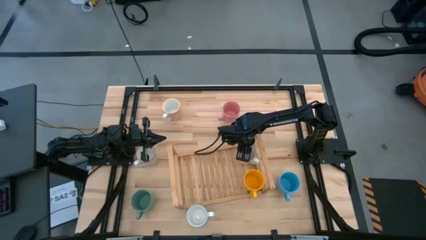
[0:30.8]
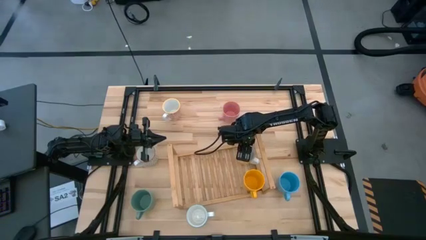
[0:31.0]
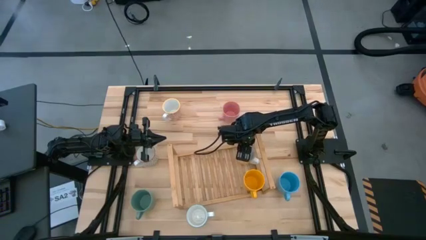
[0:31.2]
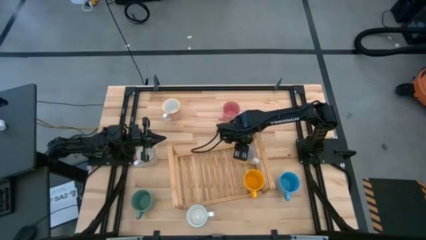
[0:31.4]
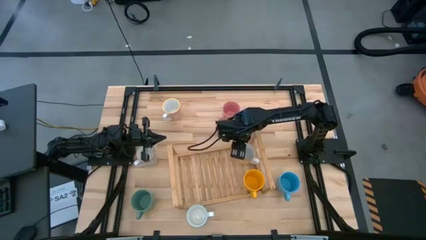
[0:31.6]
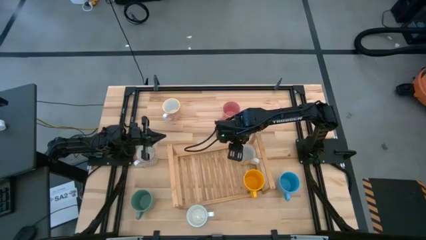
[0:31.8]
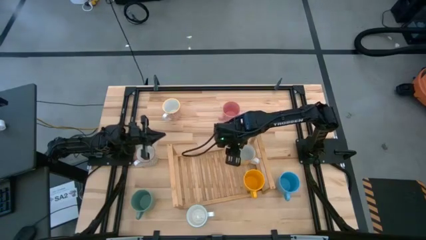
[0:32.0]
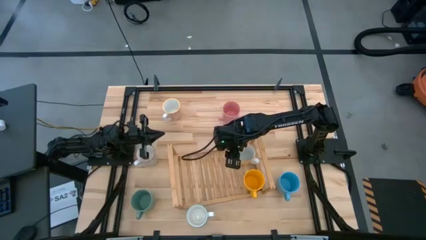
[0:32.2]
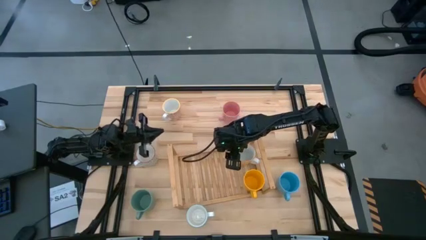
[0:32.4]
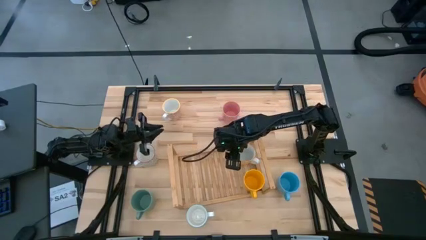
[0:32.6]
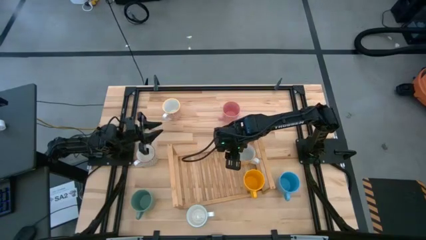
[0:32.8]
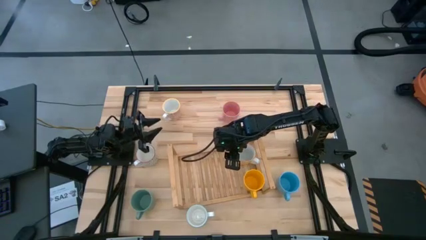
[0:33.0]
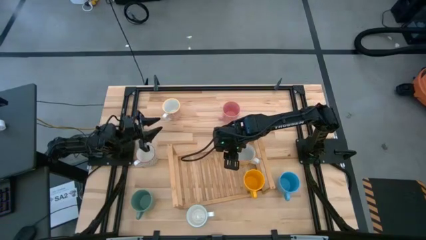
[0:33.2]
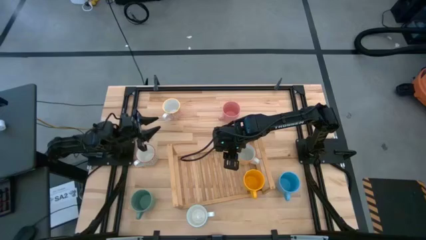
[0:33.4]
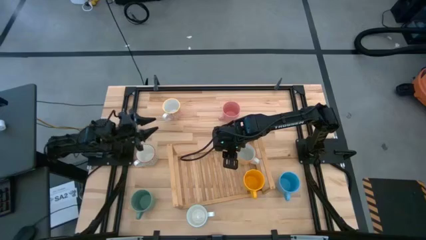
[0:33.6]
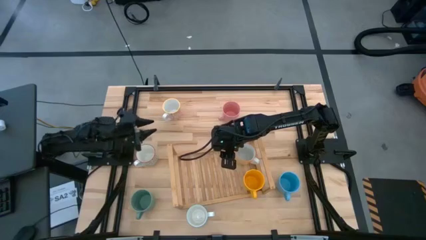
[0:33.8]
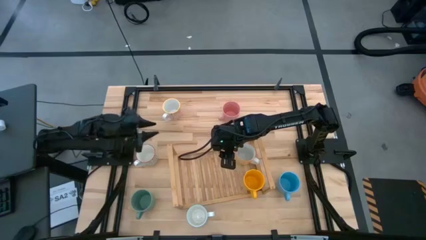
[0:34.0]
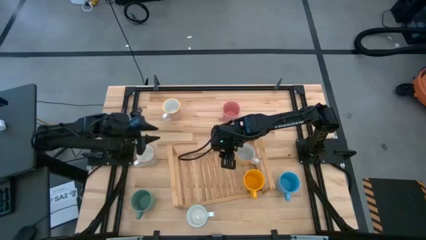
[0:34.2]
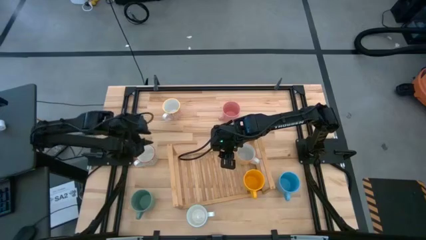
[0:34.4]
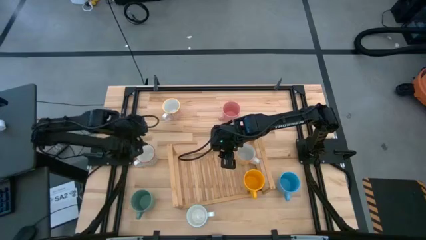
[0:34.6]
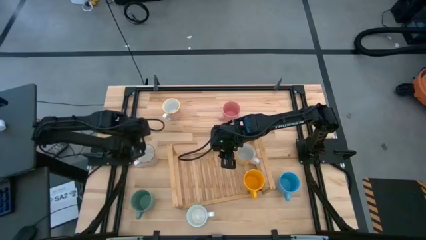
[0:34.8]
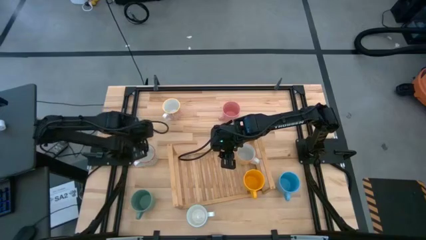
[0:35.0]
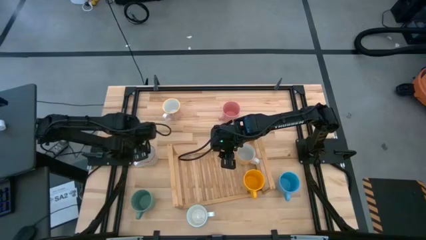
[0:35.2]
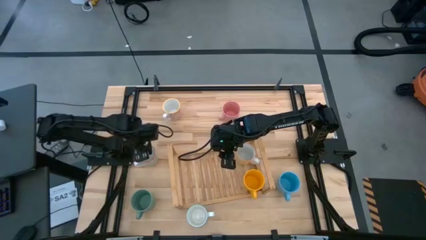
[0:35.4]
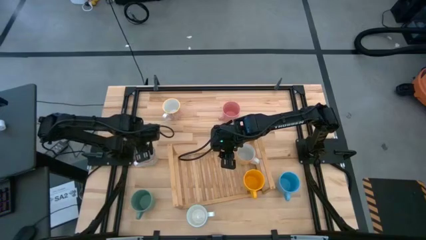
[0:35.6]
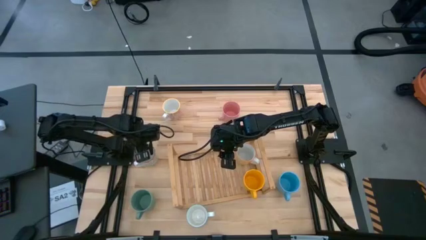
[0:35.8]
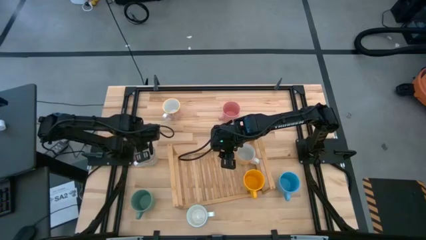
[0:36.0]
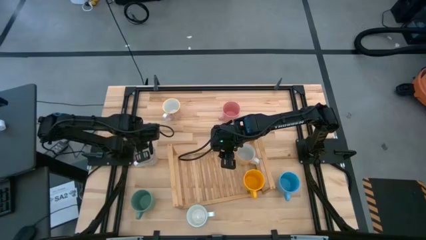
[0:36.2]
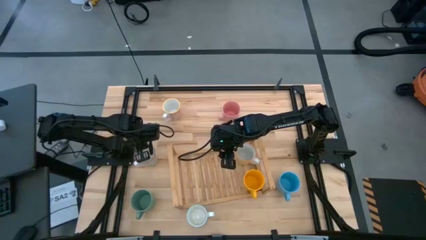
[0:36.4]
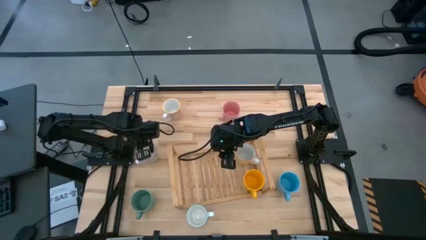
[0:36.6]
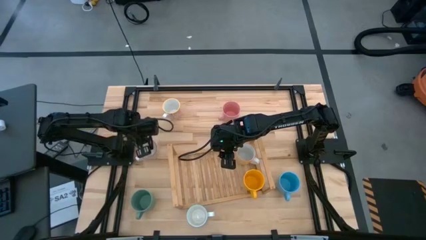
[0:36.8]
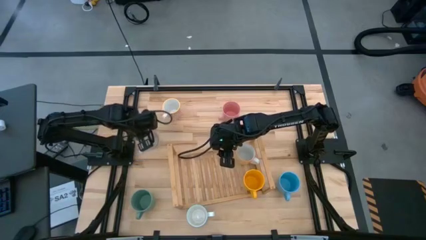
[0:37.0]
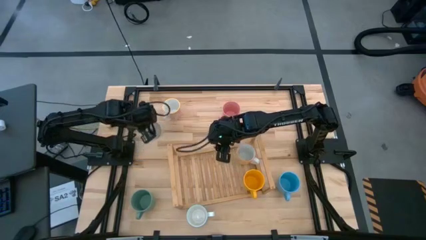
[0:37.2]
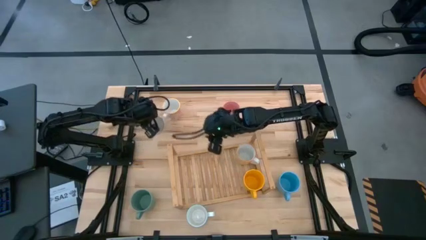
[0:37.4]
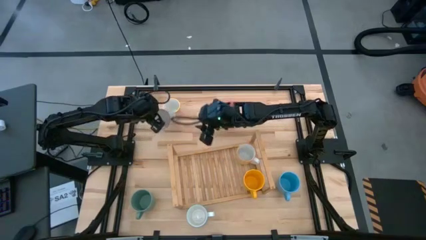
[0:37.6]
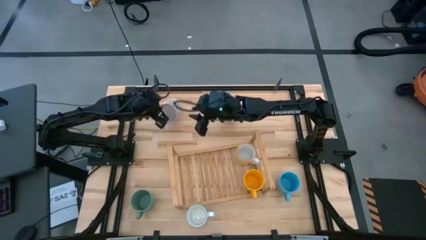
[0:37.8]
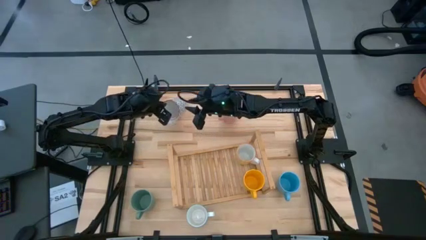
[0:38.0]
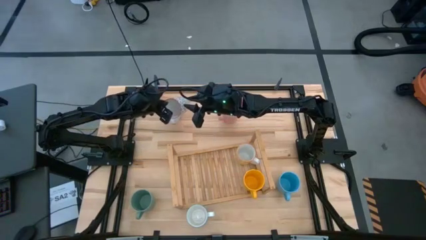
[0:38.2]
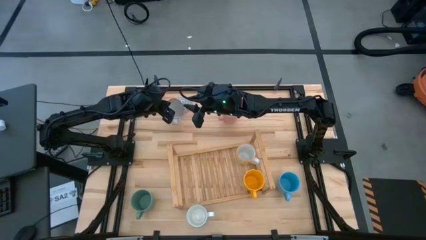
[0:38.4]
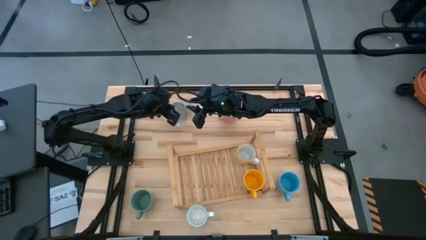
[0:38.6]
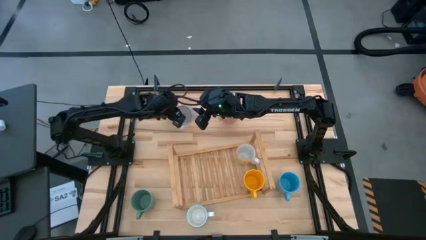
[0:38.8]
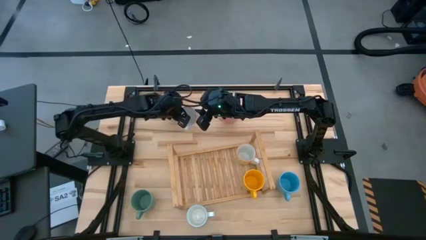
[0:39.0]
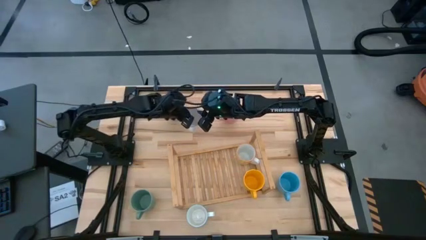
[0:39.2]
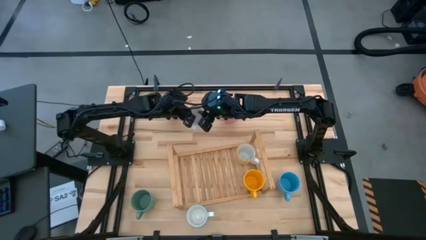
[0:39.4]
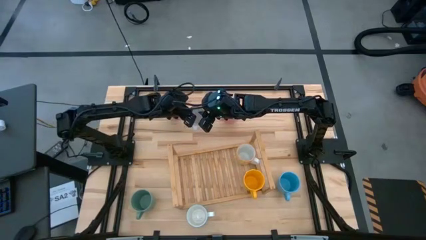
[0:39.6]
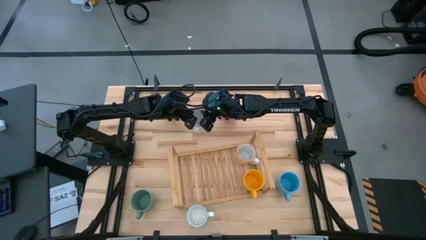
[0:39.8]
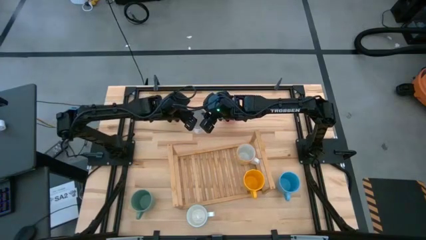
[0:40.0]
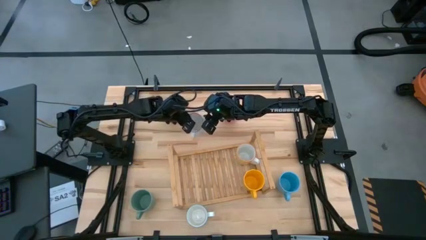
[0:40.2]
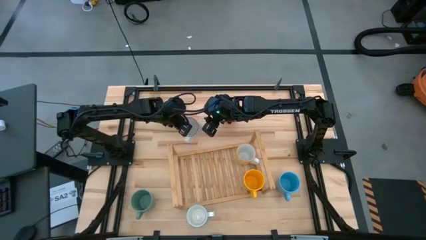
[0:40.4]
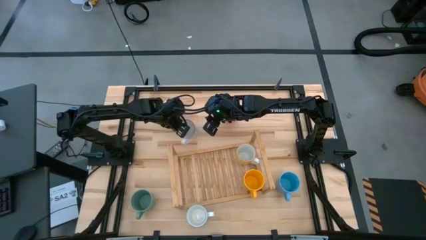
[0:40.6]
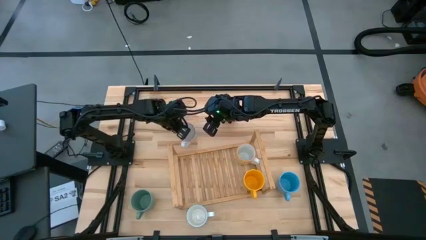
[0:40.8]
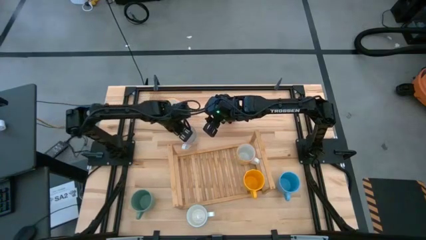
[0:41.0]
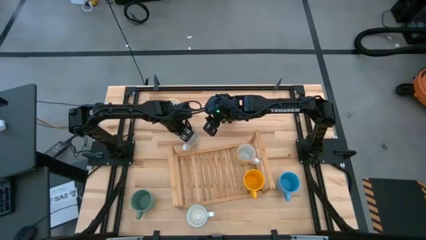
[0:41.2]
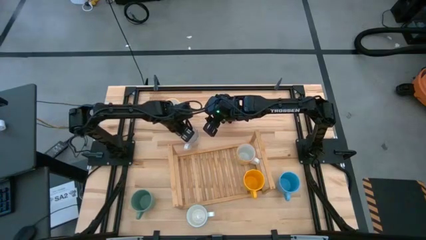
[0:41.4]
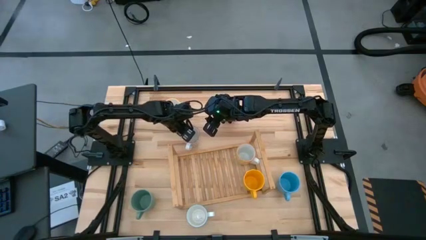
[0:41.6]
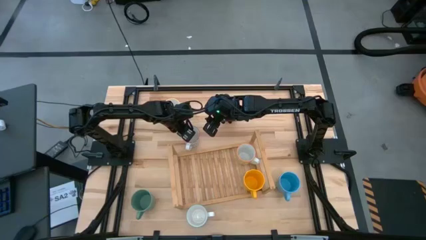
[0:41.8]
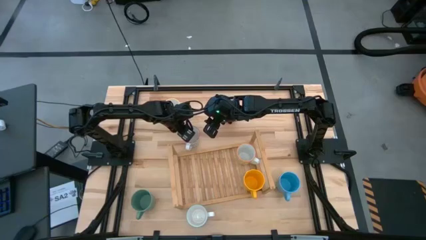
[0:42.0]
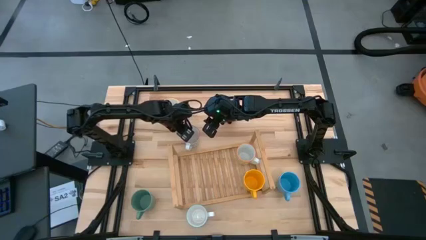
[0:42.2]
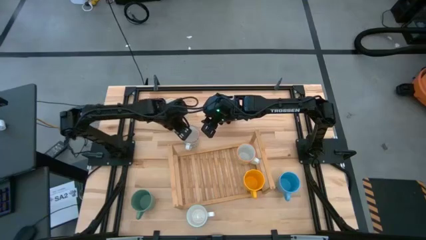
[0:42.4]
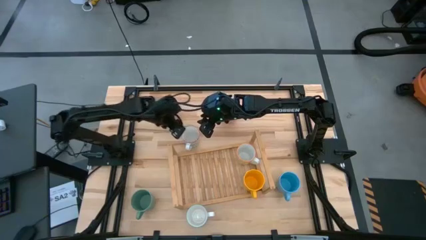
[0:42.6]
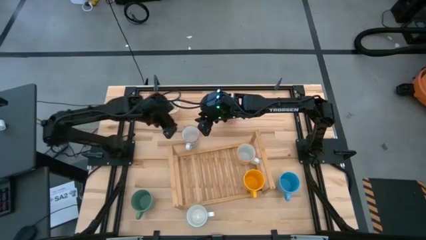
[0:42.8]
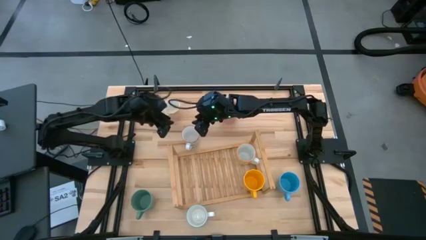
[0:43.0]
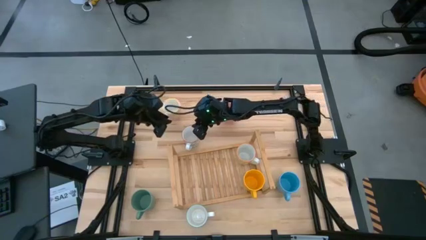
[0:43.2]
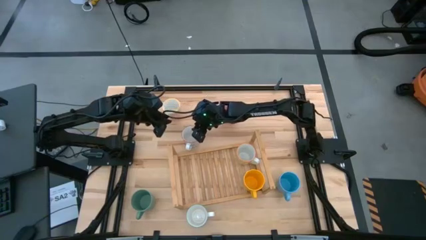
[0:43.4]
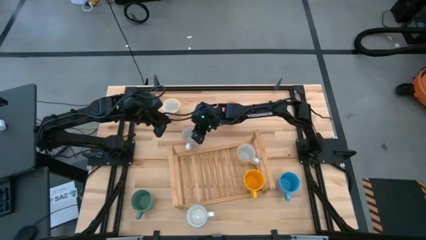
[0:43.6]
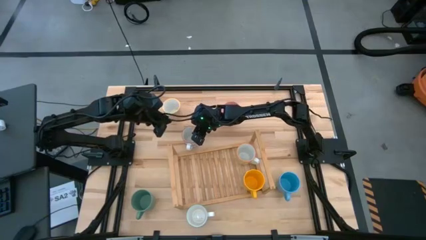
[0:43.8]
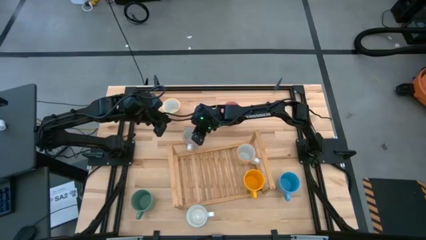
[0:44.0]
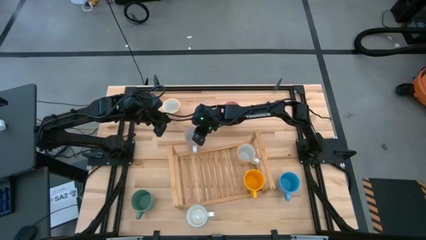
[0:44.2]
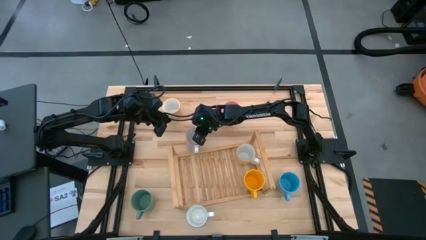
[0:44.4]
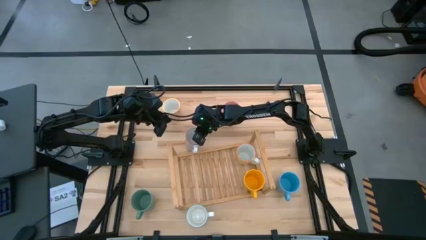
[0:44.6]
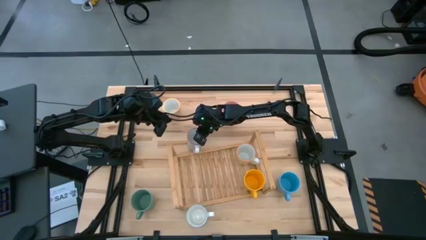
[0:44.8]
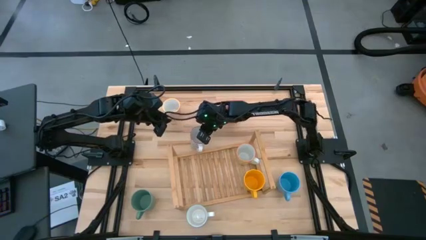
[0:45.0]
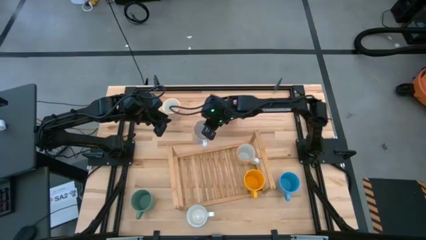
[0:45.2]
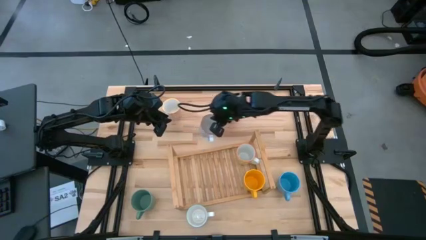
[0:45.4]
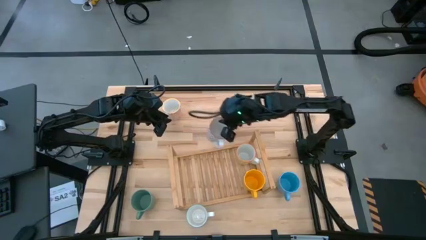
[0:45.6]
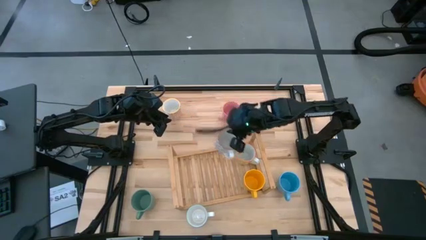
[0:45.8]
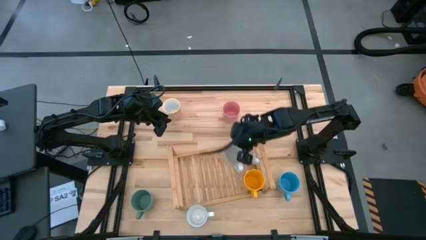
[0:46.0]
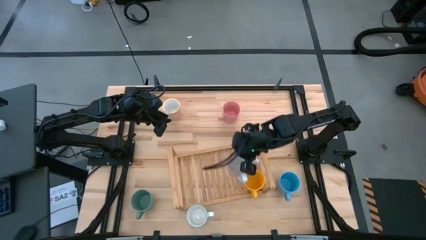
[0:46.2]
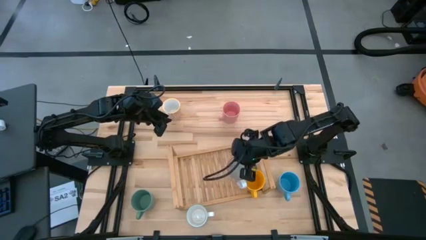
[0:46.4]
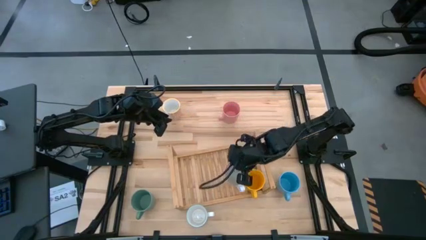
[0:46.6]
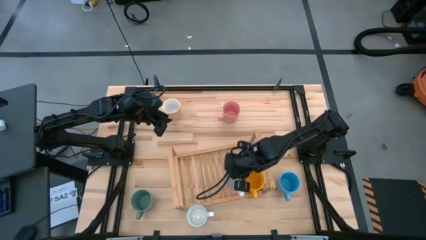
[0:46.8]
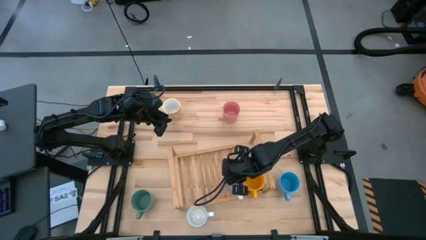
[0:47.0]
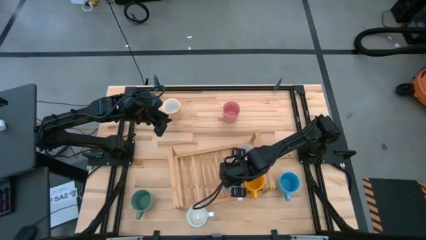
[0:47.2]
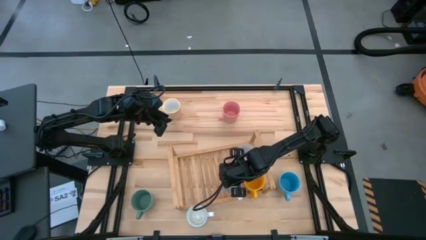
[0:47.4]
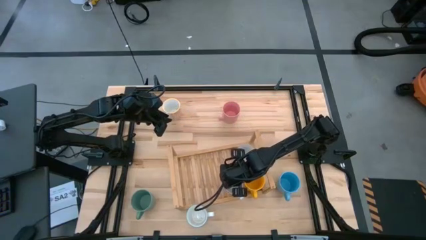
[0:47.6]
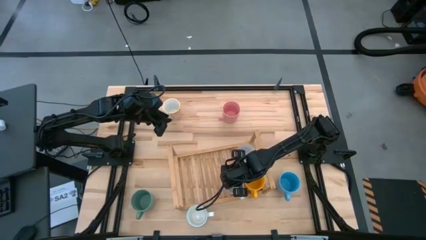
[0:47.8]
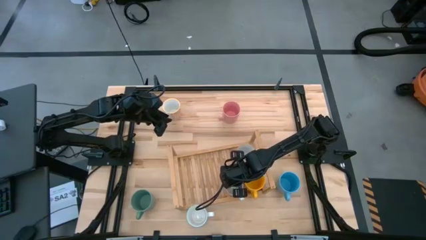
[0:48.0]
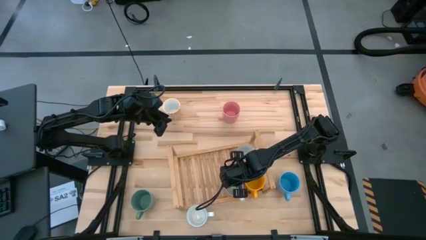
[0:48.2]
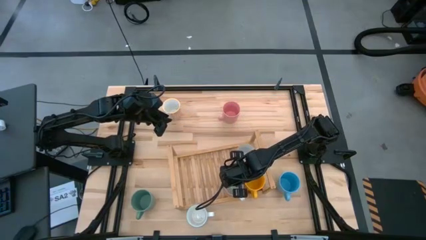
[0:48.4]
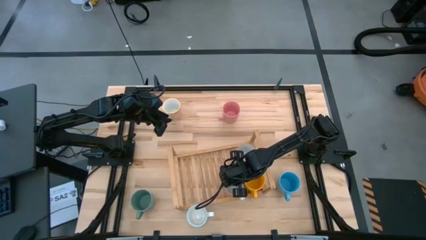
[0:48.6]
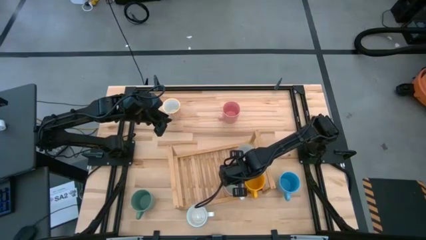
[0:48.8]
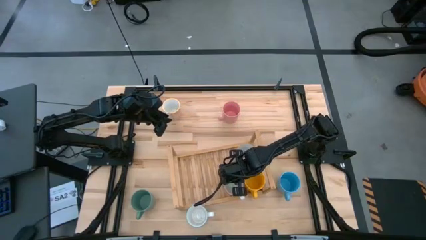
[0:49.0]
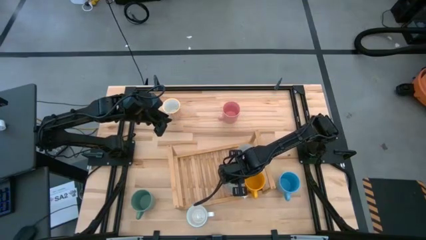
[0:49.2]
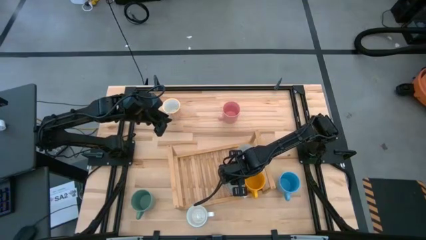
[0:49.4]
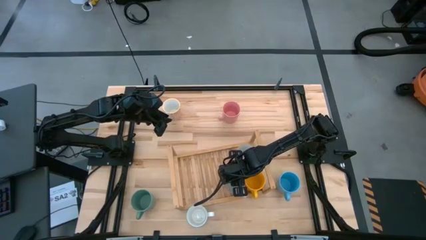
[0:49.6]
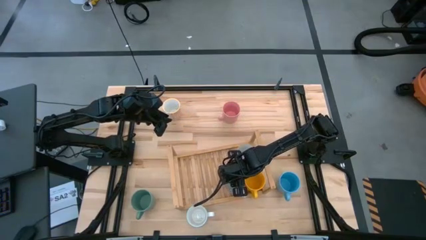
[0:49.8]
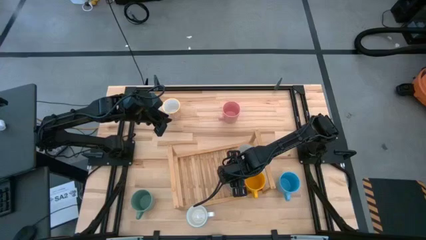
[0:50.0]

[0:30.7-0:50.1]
Task: Place coffee mugs
Put the white-gray patterned mug on the shelf
